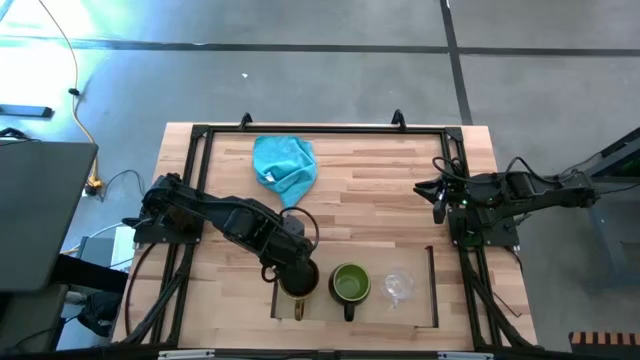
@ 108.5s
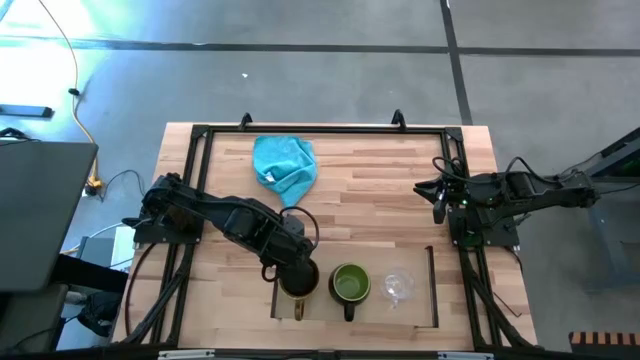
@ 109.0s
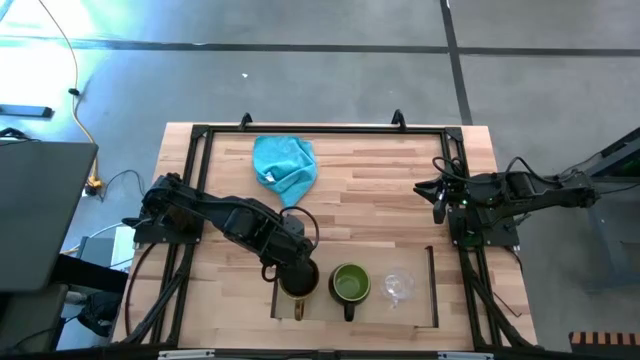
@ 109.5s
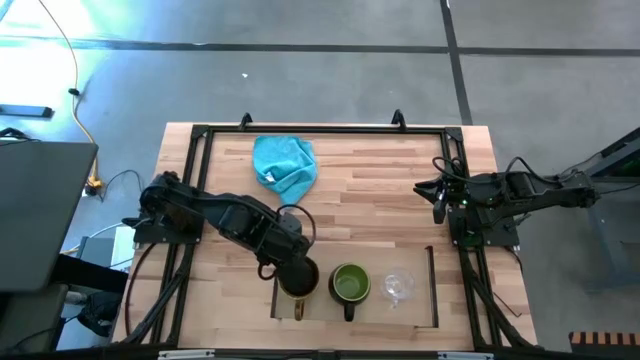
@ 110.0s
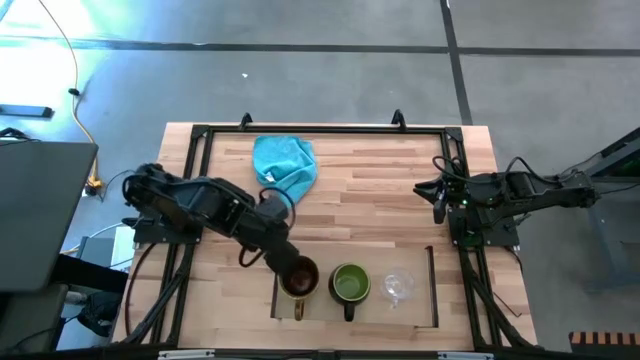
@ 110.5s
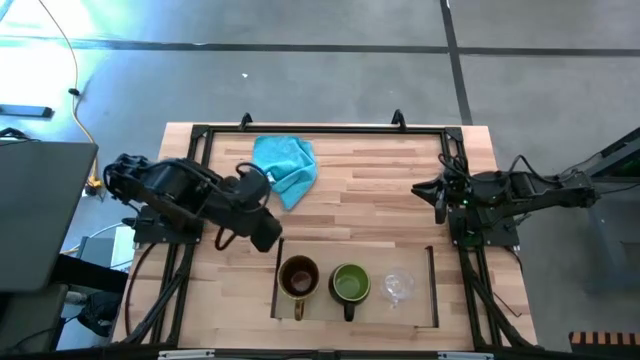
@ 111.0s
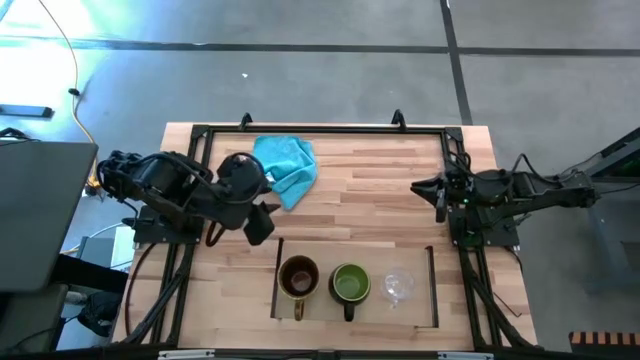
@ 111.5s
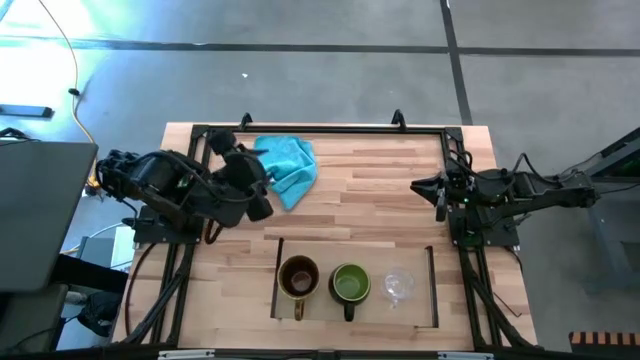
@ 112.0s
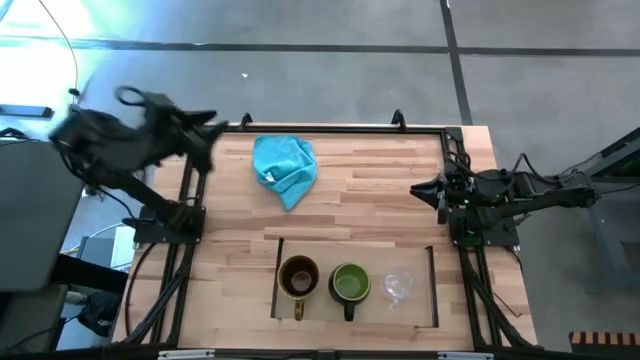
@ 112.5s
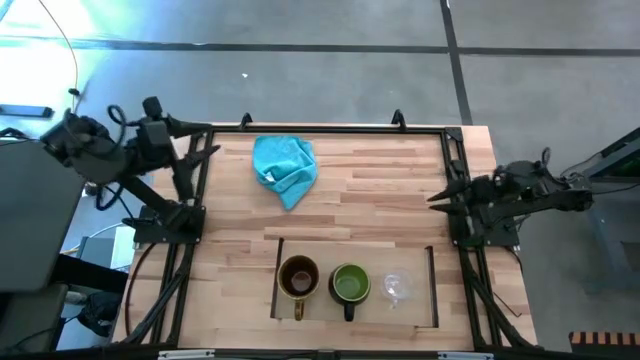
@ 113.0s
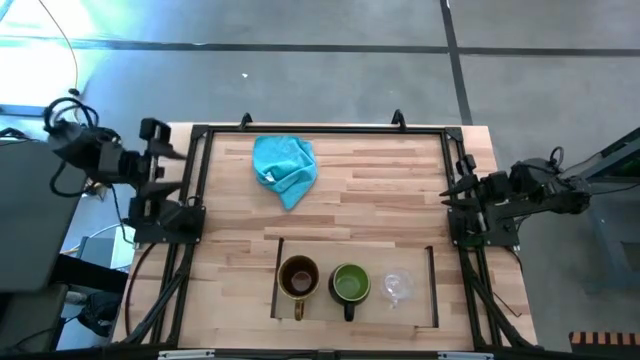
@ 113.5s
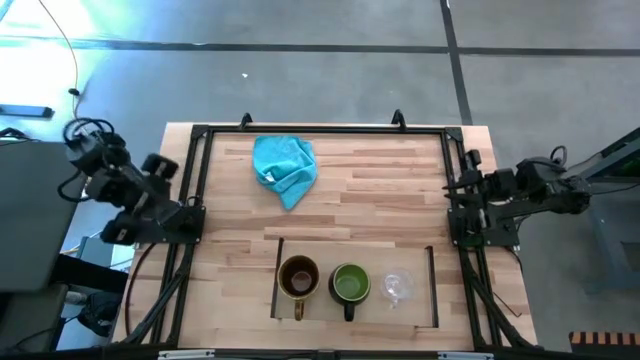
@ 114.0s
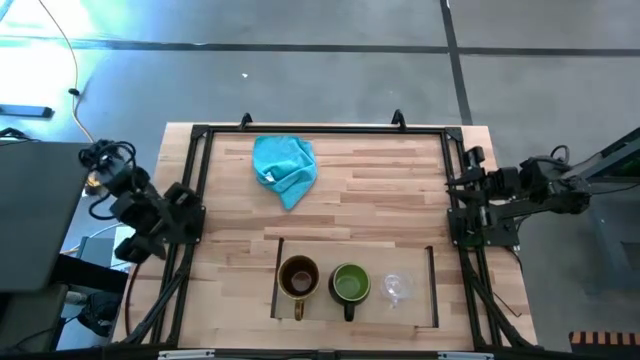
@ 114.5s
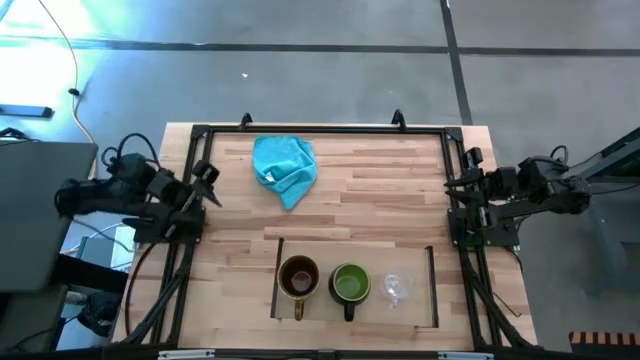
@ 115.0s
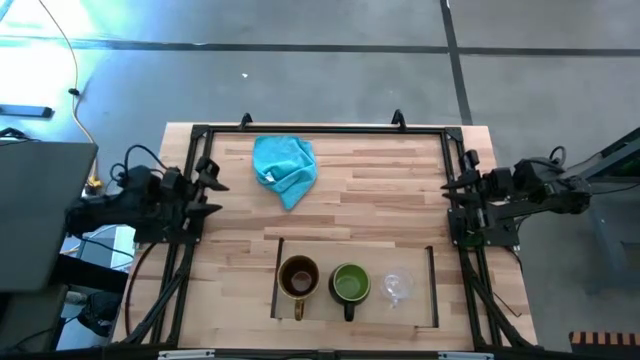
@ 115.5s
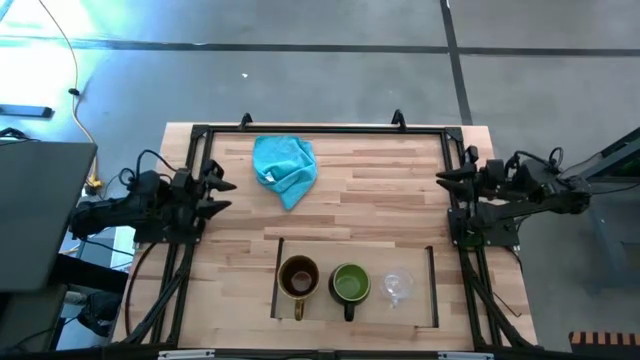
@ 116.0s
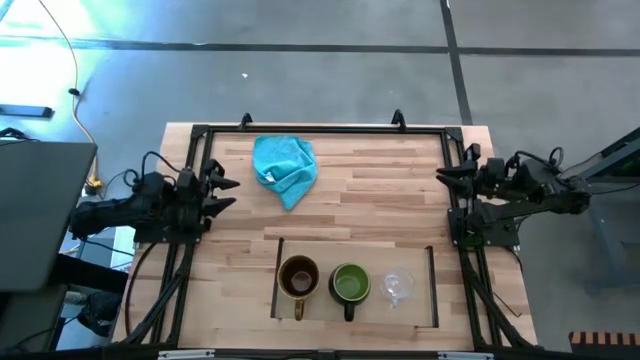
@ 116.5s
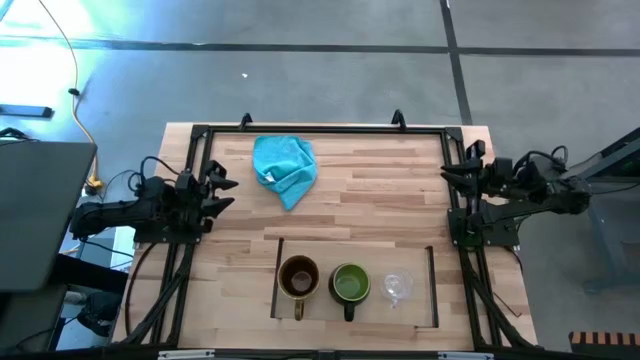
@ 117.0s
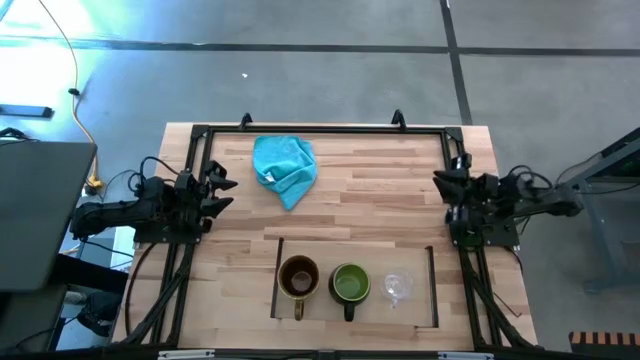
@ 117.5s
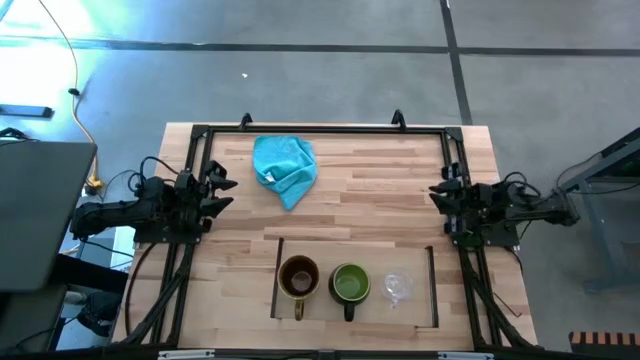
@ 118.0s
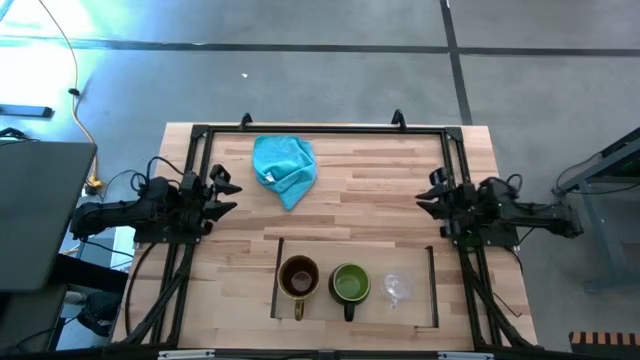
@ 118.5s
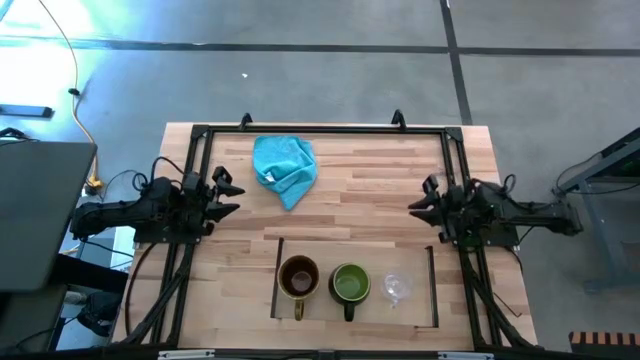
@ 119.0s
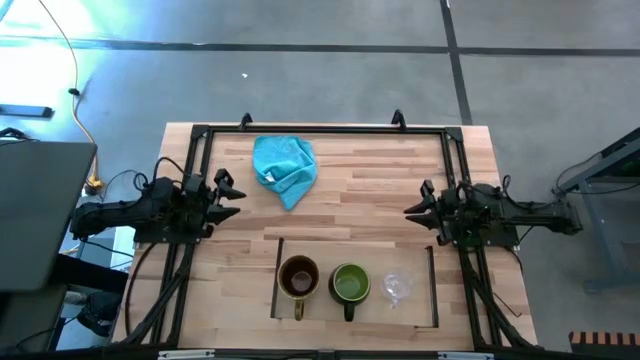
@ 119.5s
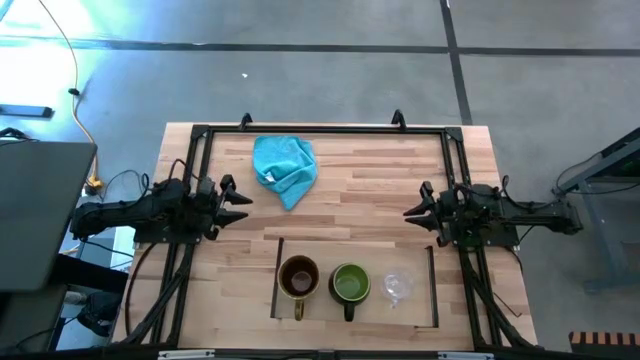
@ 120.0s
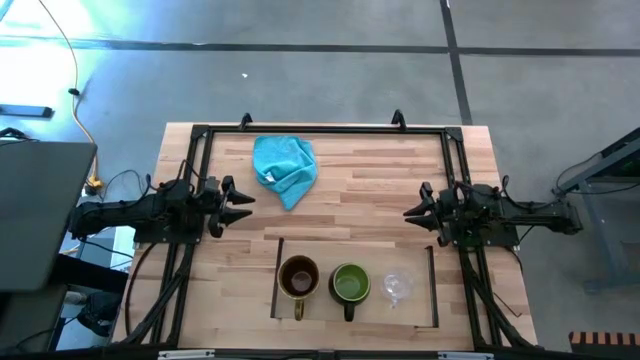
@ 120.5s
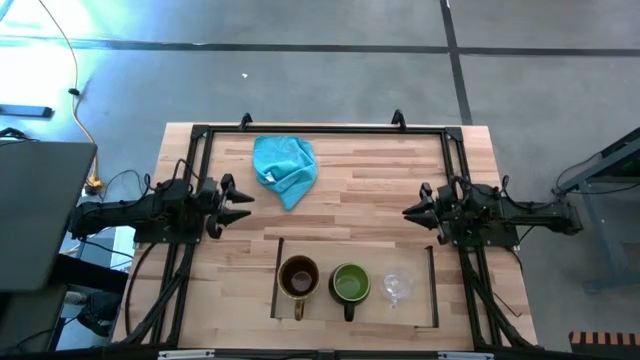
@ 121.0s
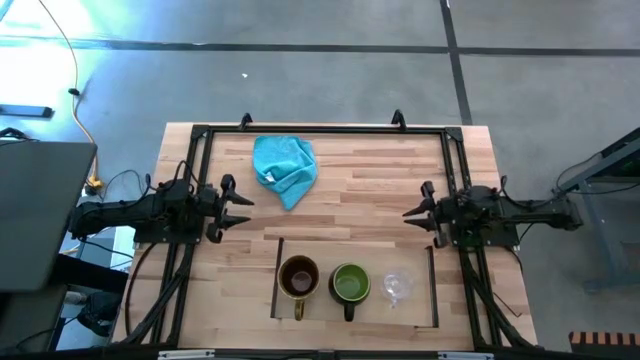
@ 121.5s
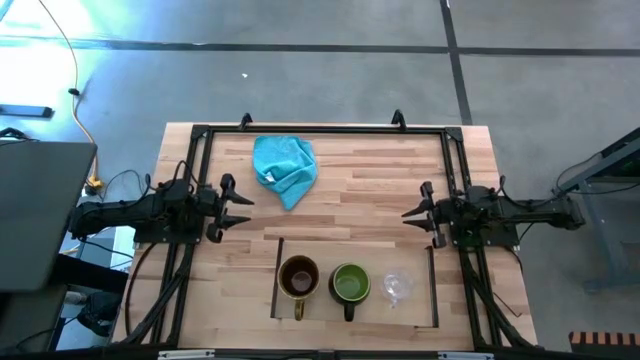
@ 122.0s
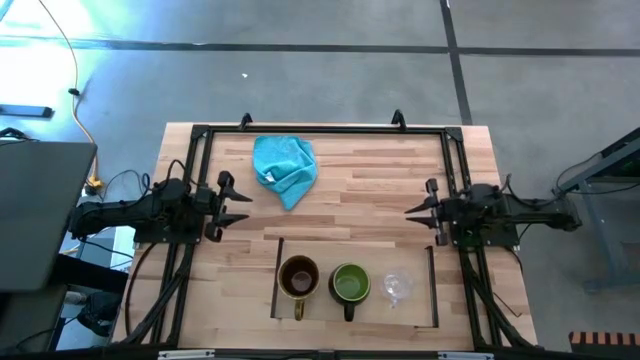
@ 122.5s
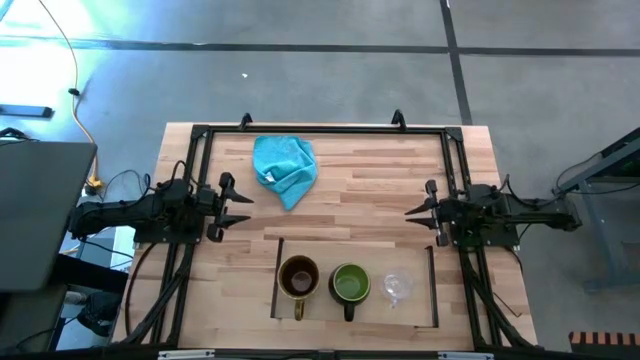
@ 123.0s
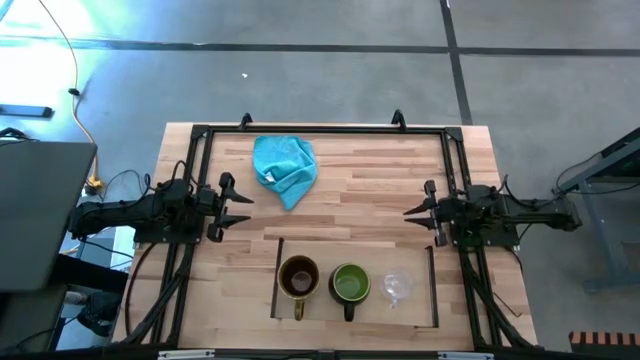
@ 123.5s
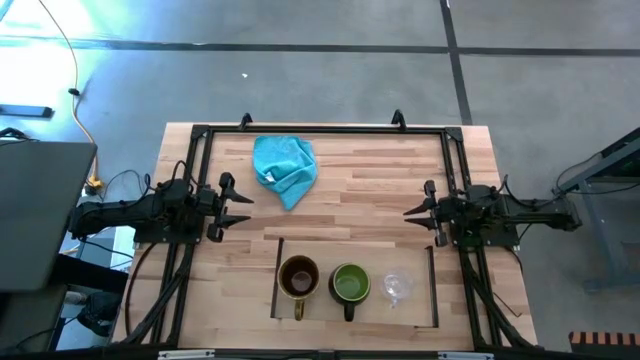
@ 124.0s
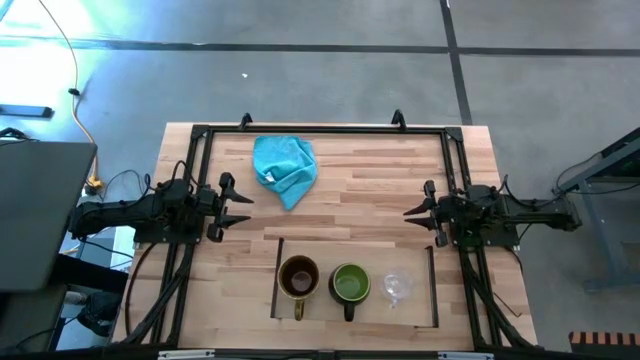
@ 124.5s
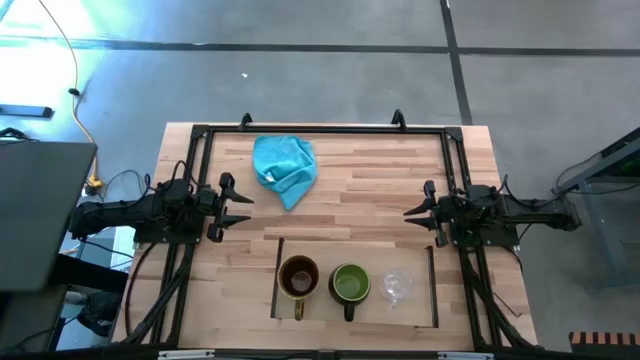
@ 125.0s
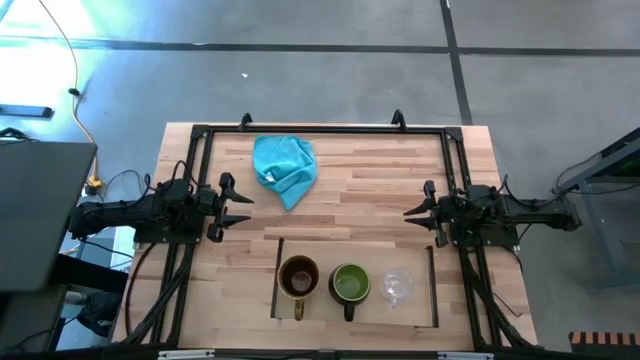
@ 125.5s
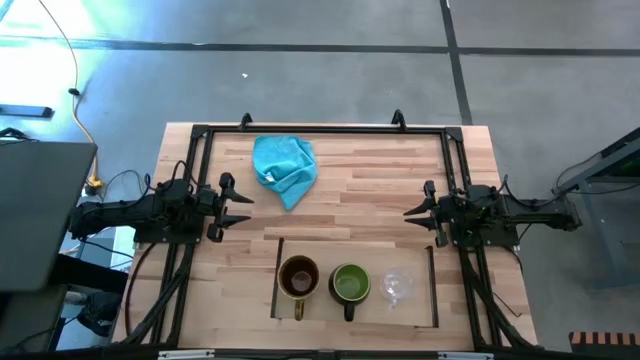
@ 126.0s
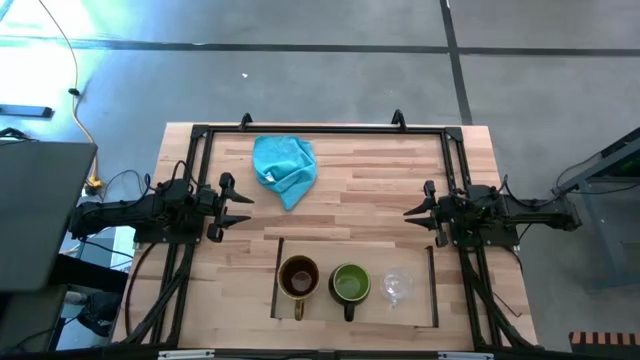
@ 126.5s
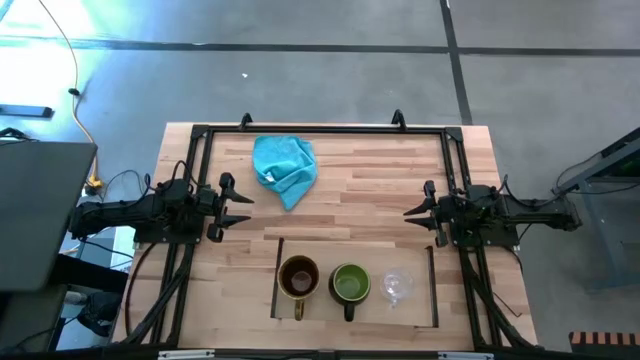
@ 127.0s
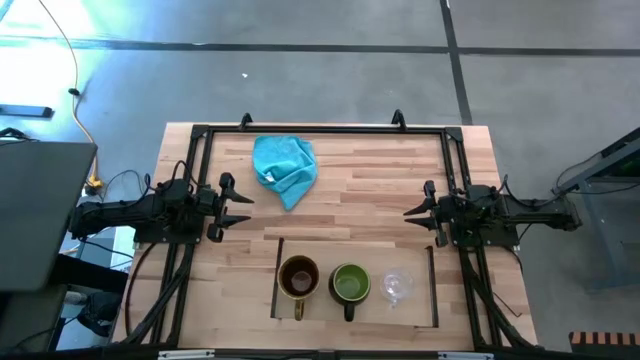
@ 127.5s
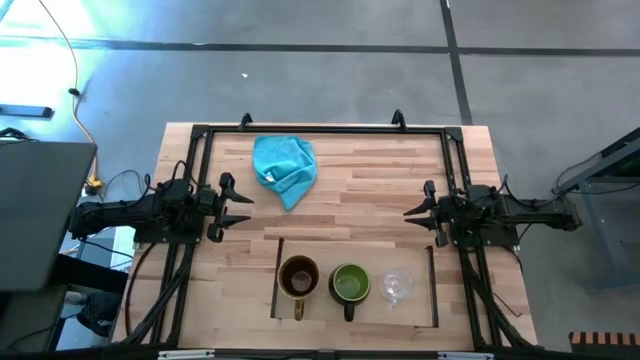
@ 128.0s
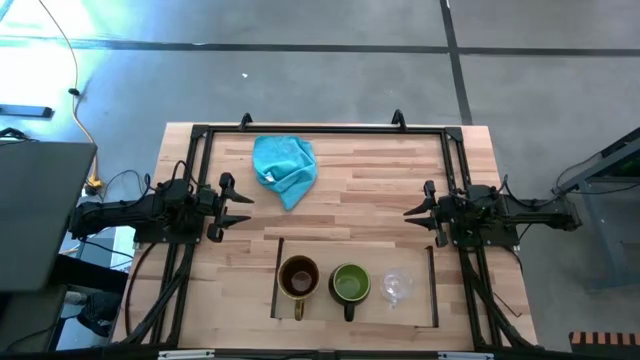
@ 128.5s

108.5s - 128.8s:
Task: Stack small to large cups/mugs on shelf
Return to Home Position
